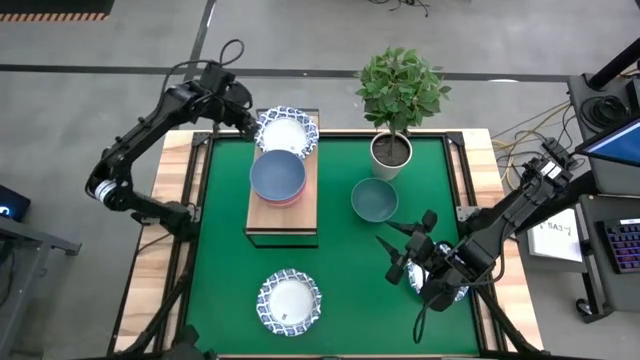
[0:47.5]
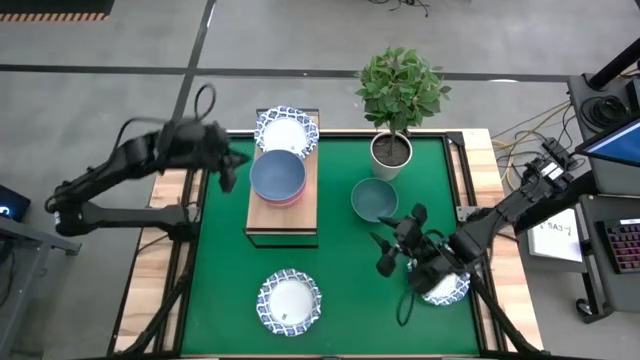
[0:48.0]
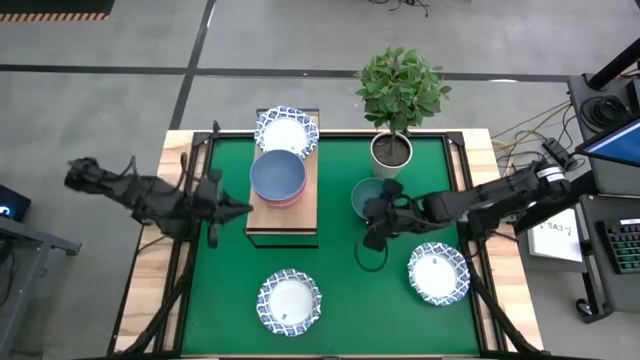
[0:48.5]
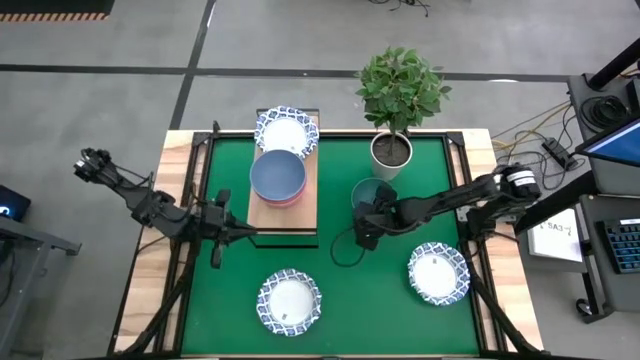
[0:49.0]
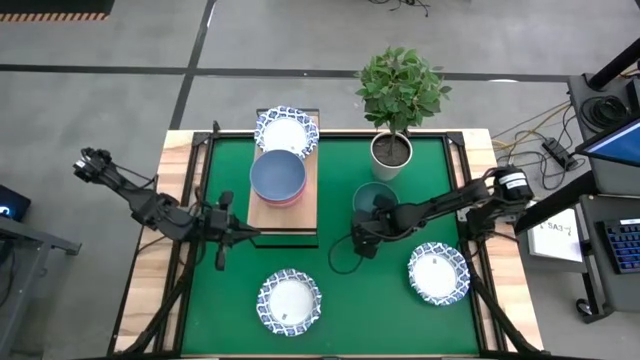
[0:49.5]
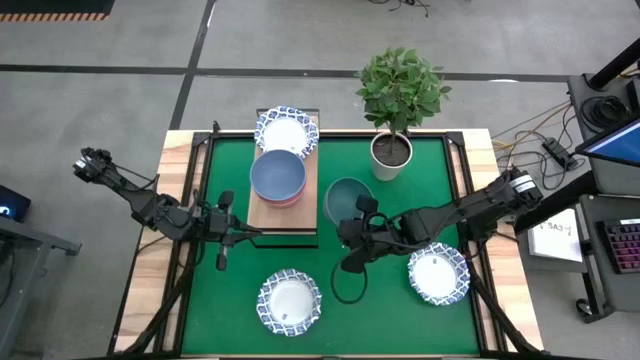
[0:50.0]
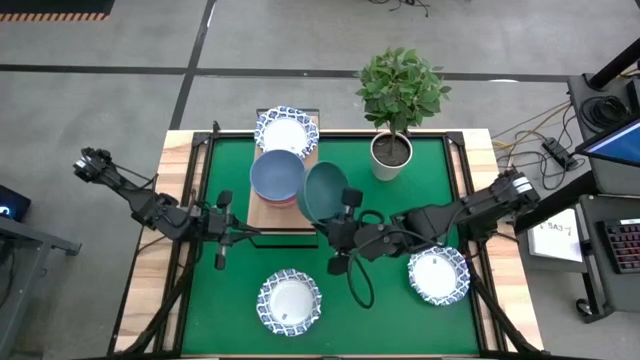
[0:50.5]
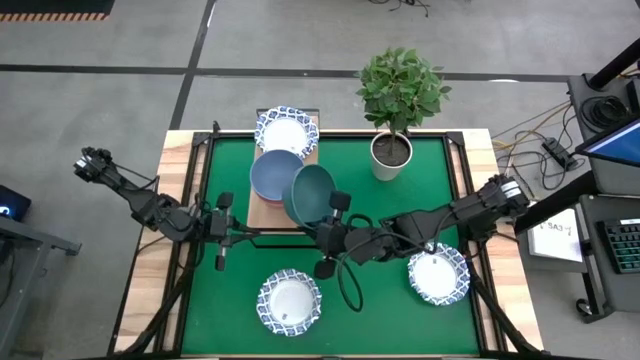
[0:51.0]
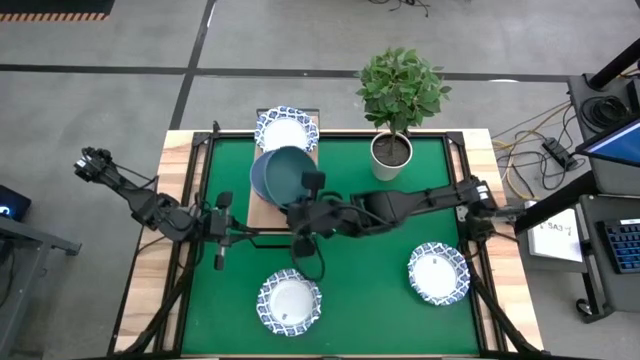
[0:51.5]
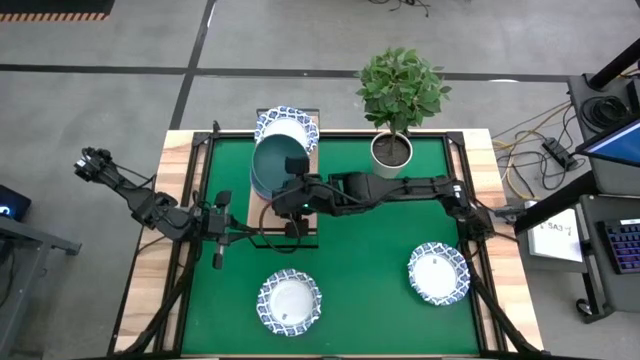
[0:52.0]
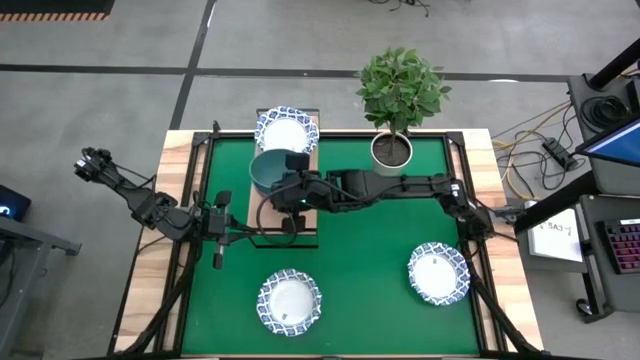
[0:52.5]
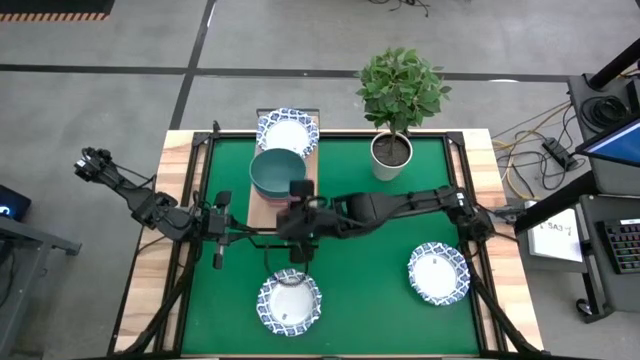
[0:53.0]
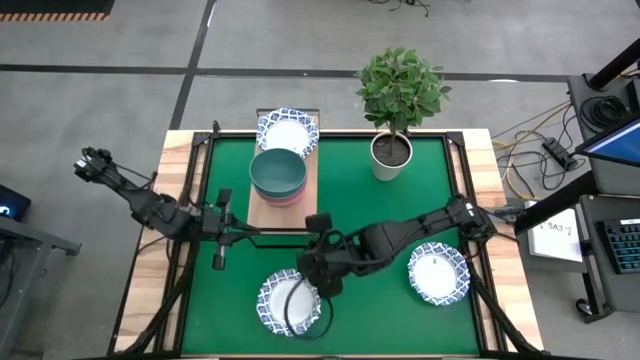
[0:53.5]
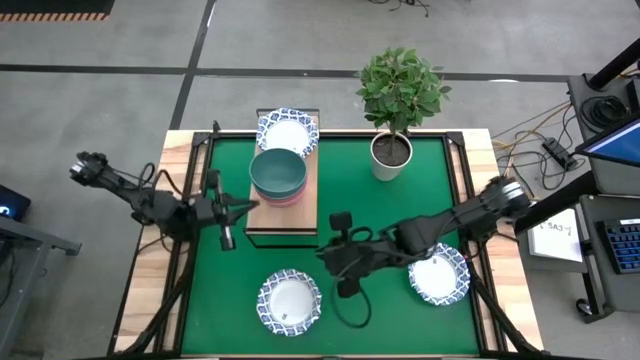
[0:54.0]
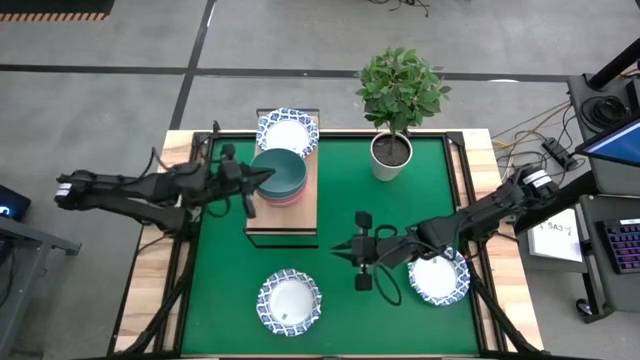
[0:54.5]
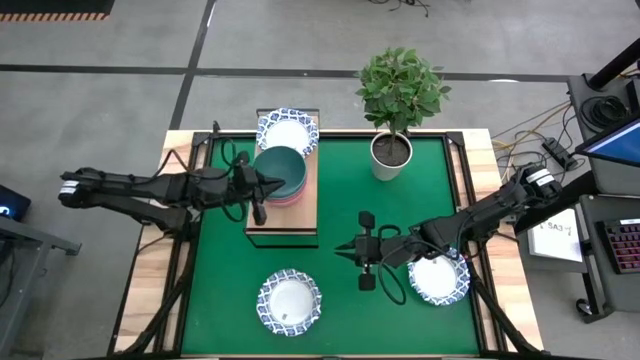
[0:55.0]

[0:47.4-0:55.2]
Task: Place and stack bowls onto a shelf
Stack the green bowl on top of the blue bowl on the shelf

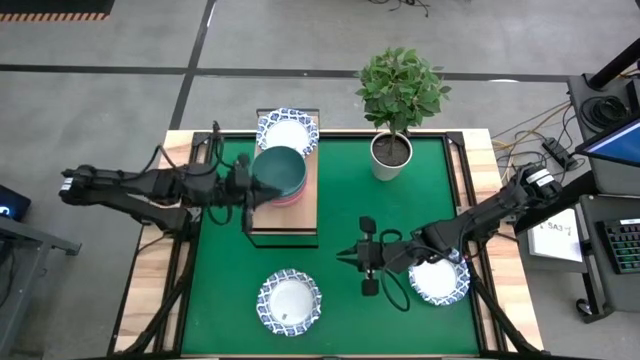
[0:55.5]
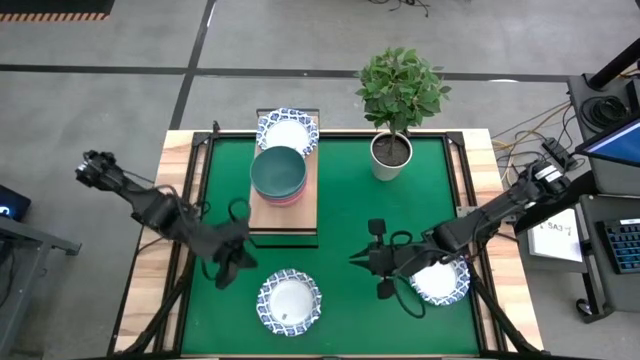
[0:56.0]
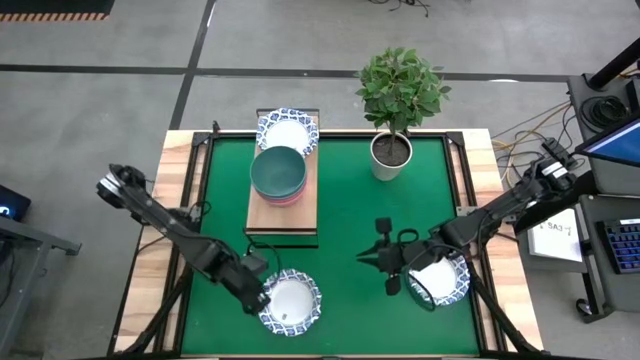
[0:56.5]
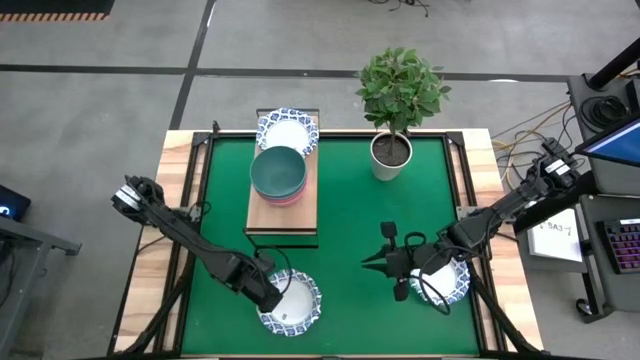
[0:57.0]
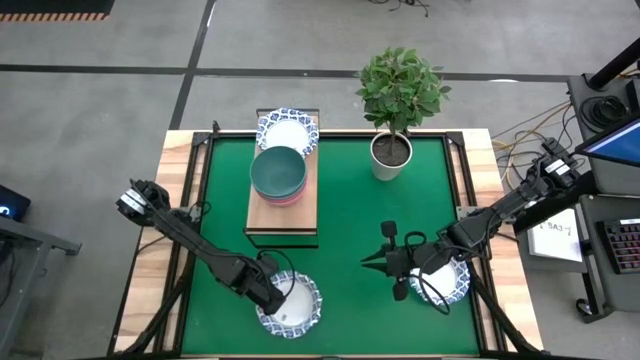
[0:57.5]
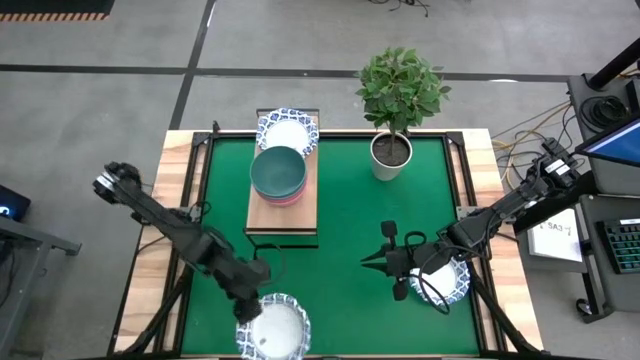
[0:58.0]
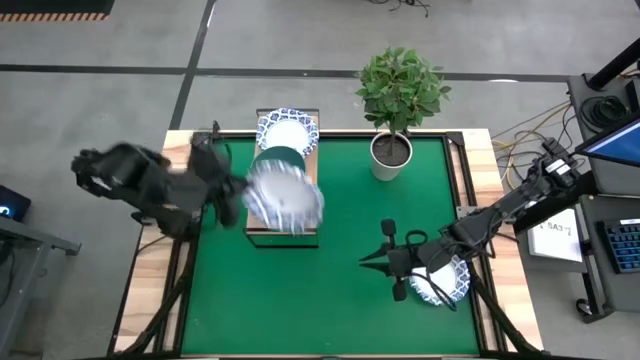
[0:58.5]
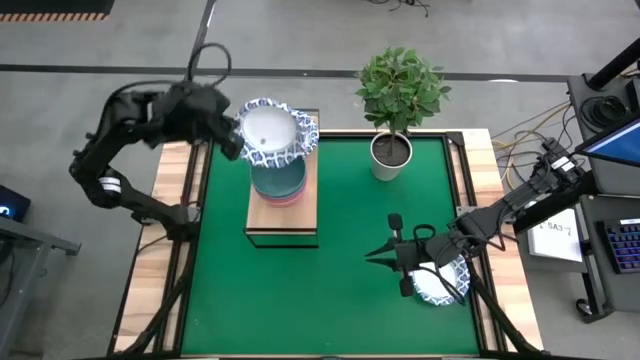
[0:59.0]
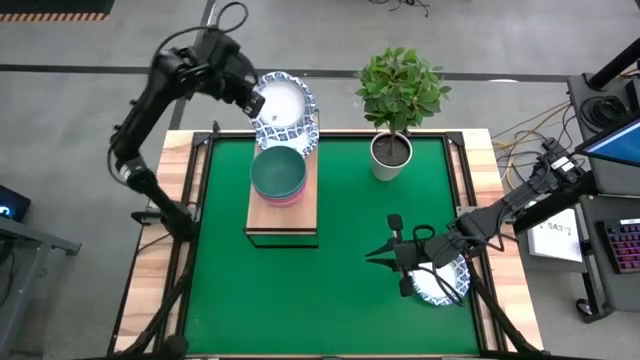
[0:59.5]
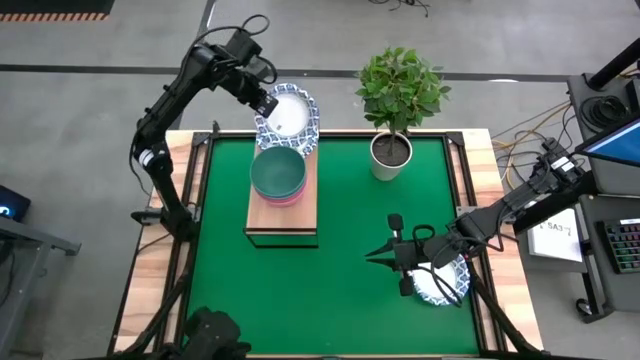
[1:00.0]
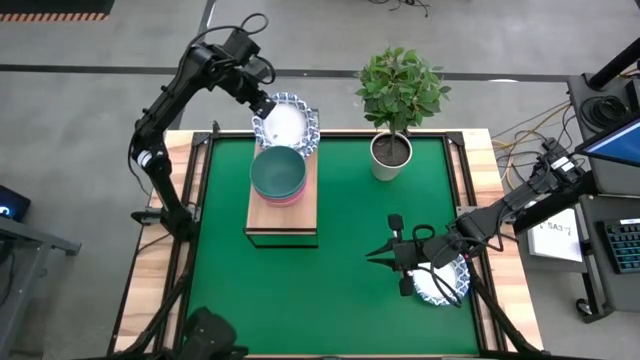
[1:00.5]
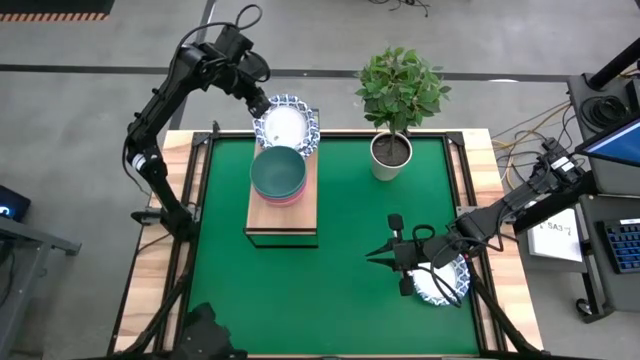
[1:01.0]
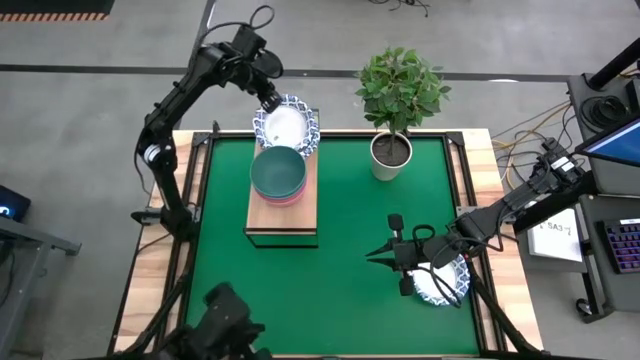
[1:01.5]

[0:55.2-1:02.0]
Stack the white patterned bowl on top of the white patterned bowl on the shelf

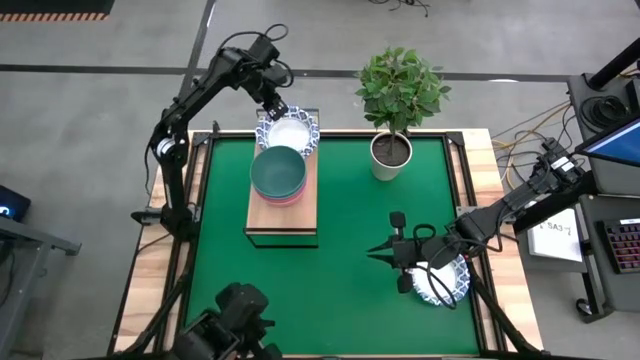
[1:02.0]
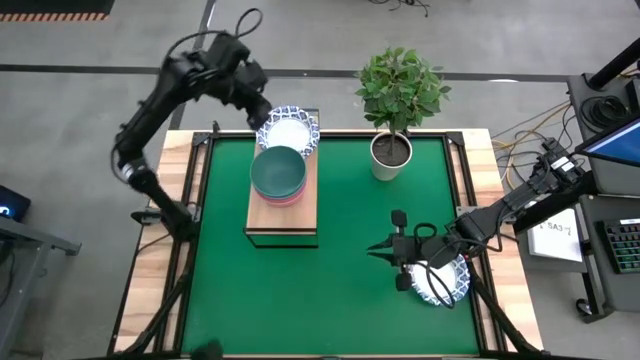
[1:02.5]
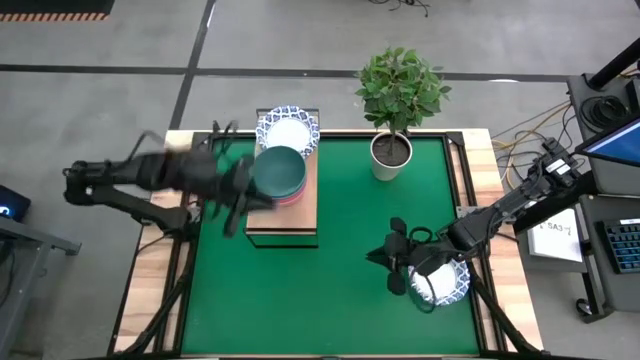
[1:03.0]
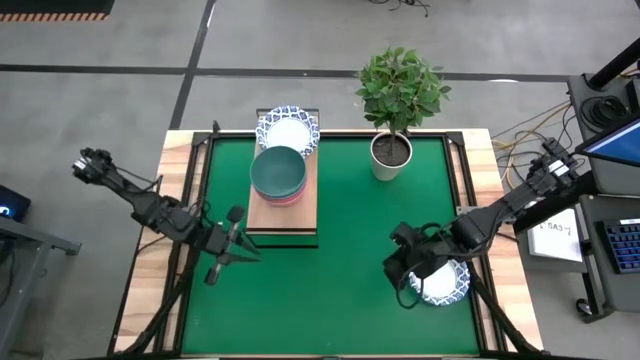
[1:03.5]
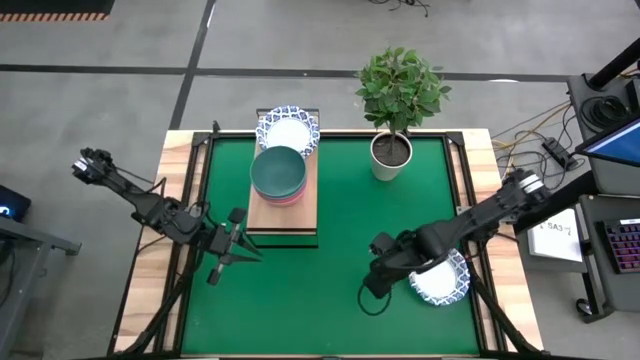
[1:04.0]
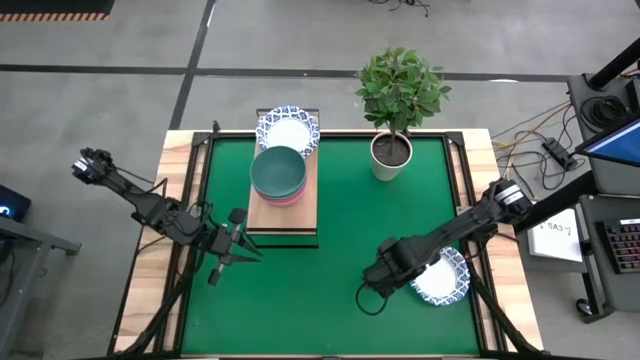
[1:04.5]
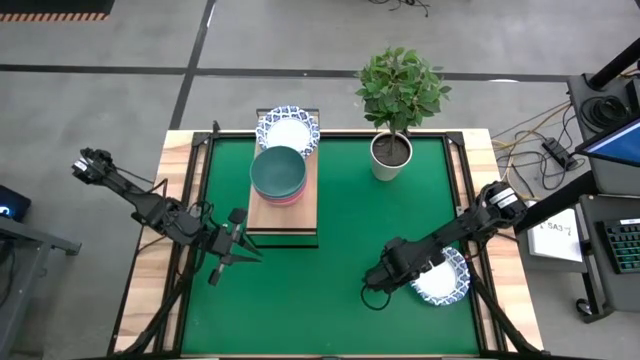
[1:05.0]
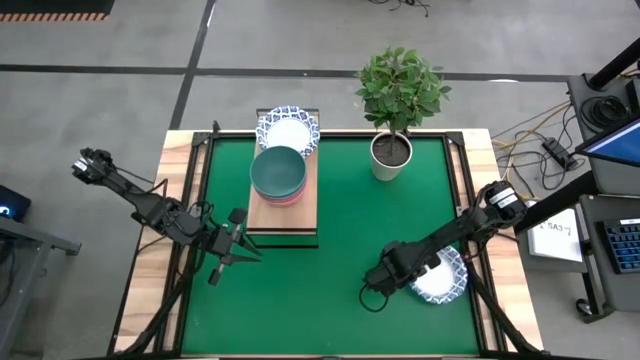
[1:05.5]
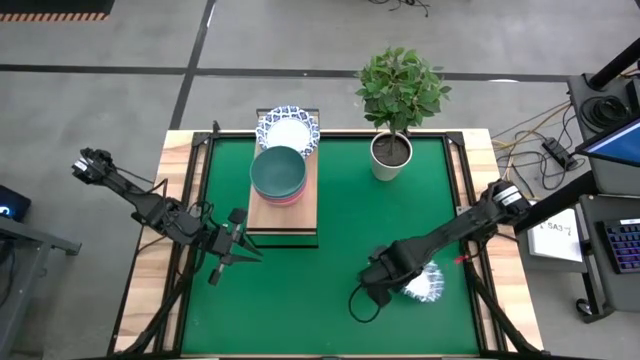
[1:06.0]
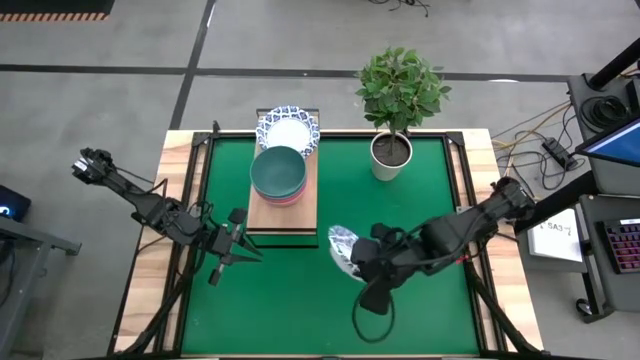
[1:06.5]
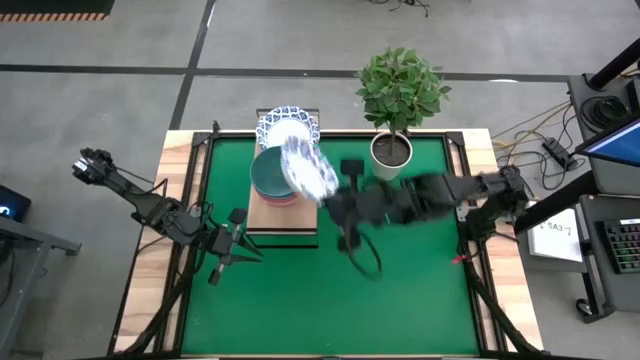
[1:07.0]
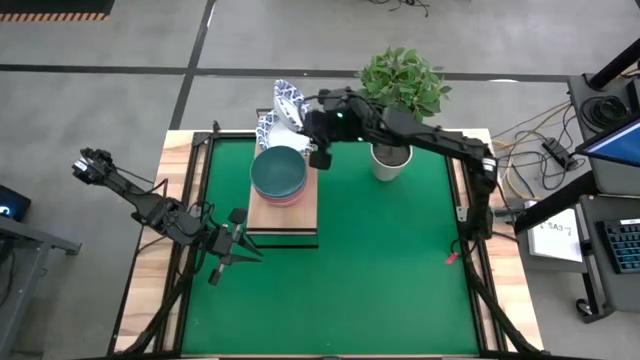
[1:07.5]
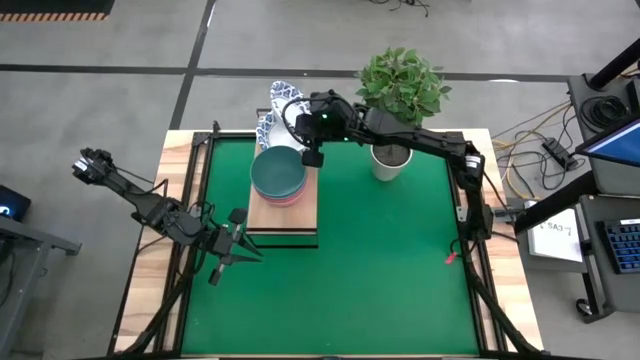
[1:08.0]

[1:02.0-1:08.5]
Stack the white patterned bowl on top of the white patterned bowl on the shelf
